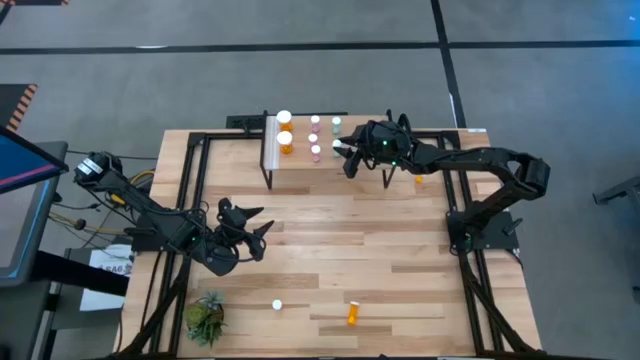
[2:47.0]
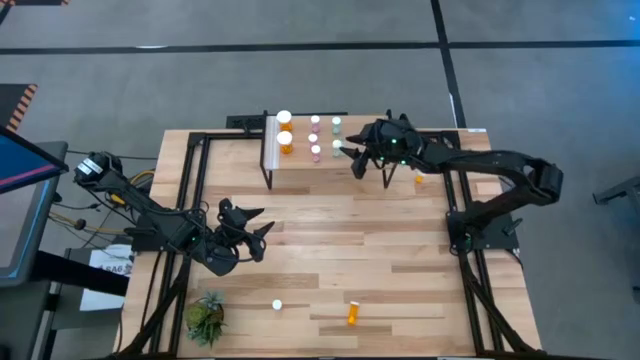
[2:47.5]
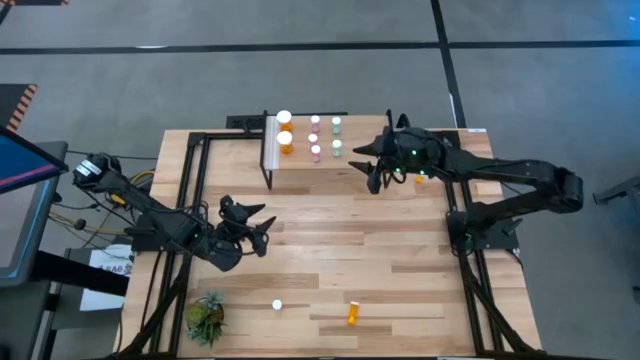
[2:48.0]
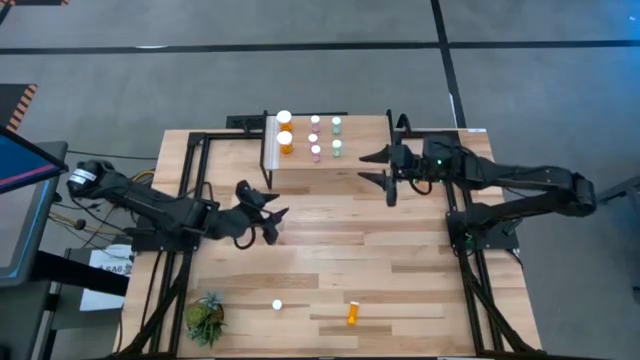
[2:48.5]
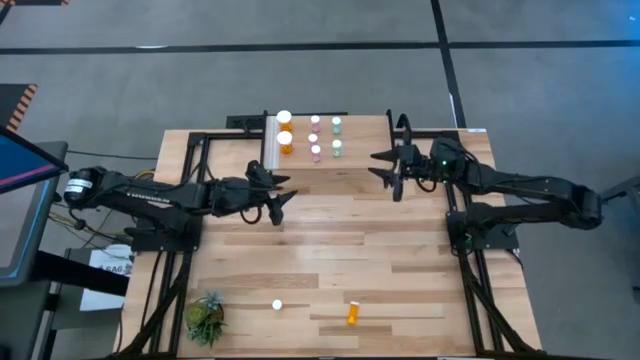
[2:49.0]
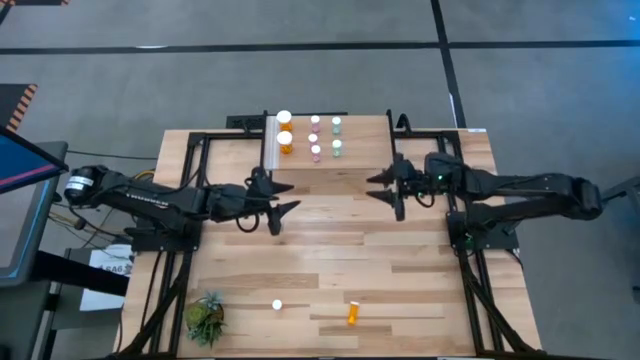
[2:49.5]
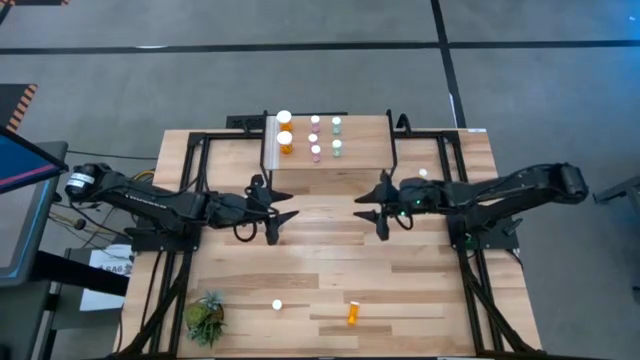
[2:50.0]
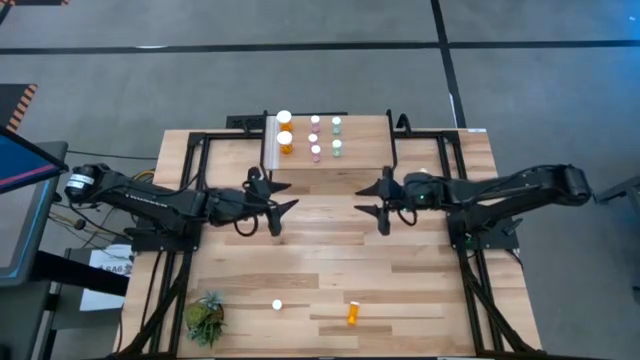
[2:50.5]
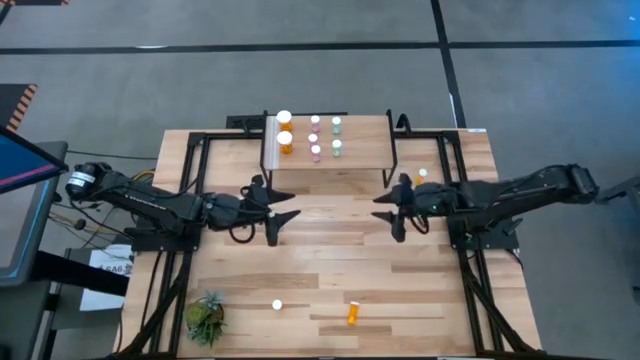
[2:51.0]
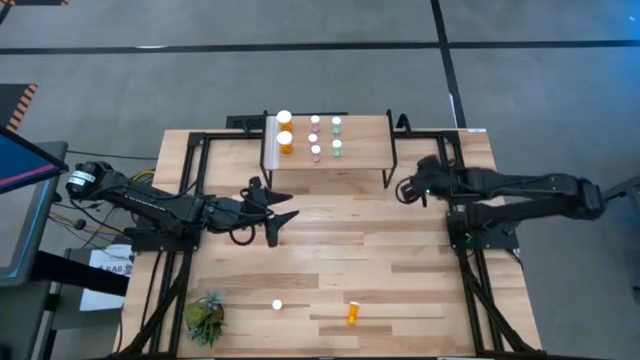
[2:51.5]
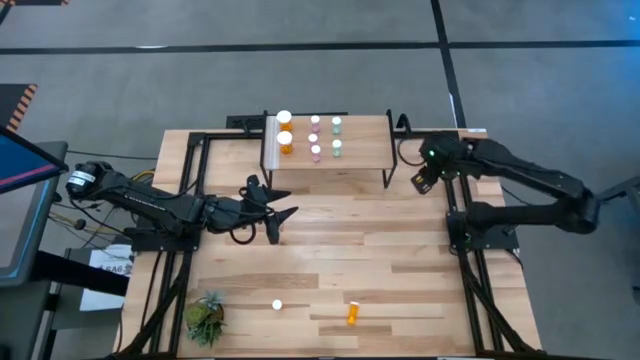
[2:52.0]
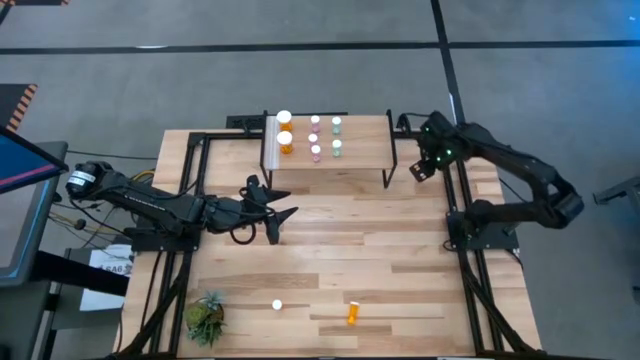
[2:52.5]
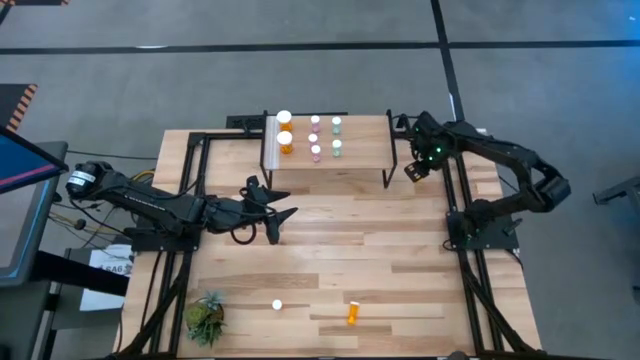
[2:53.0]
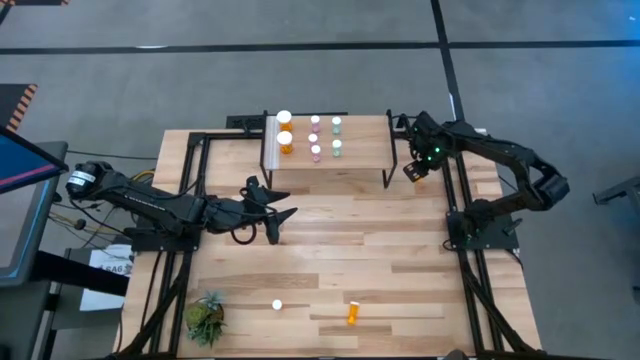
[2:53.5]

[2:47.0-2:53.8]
Task: Pick and place medicine bottles onto shelf by color
Put the top small orange pill bottle on the shelf

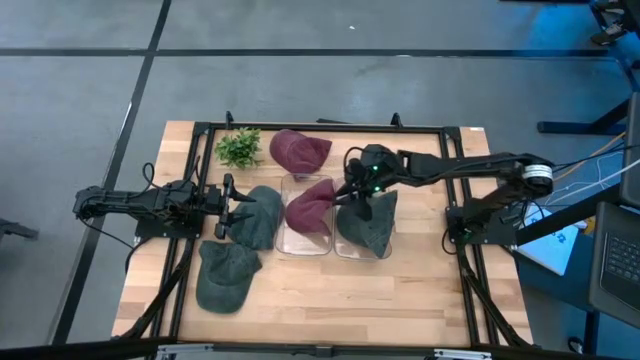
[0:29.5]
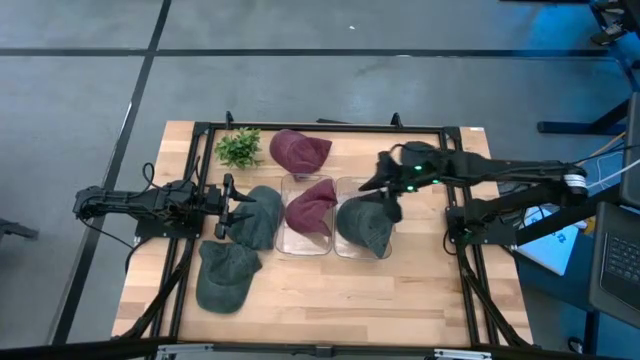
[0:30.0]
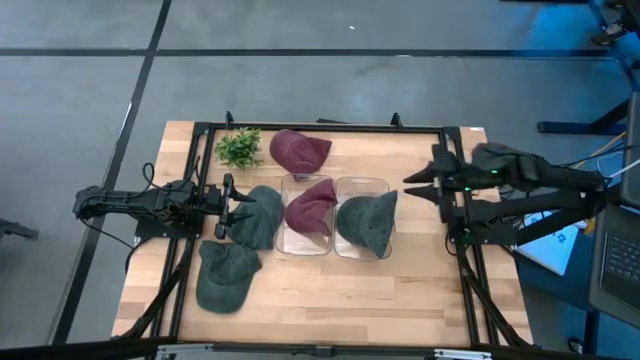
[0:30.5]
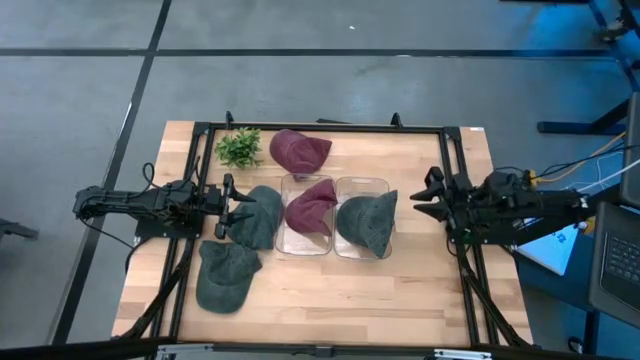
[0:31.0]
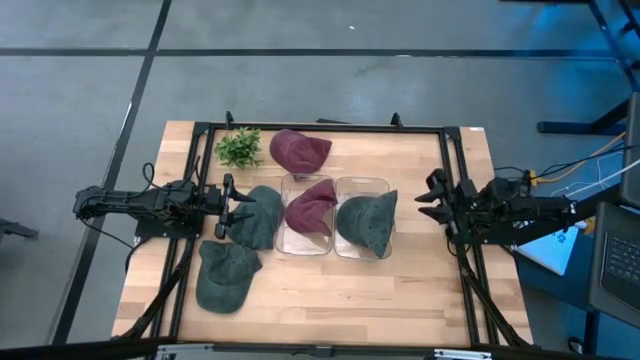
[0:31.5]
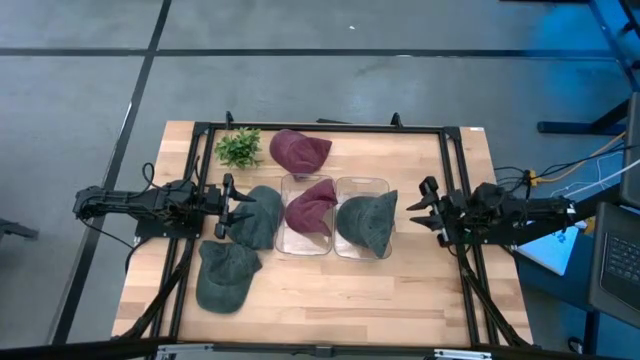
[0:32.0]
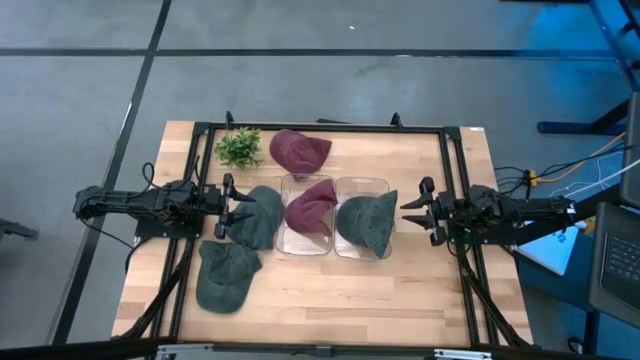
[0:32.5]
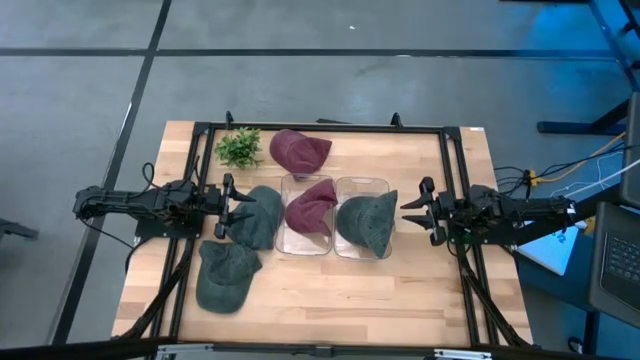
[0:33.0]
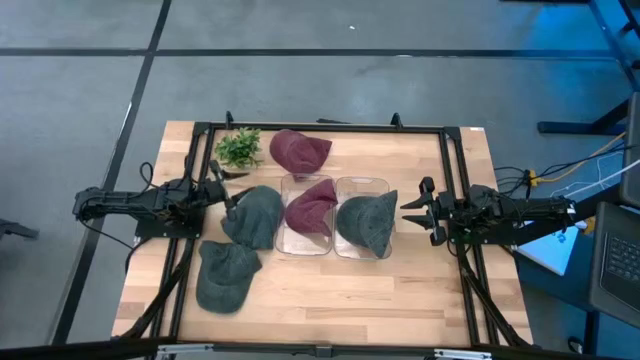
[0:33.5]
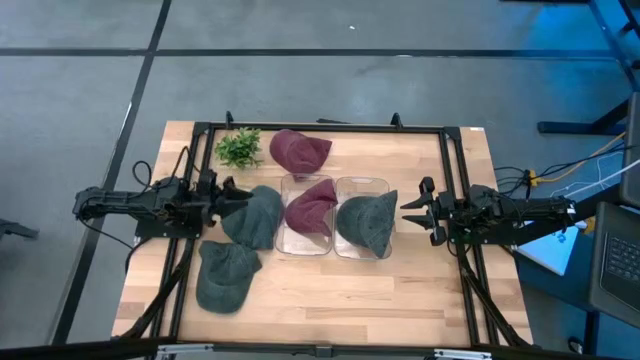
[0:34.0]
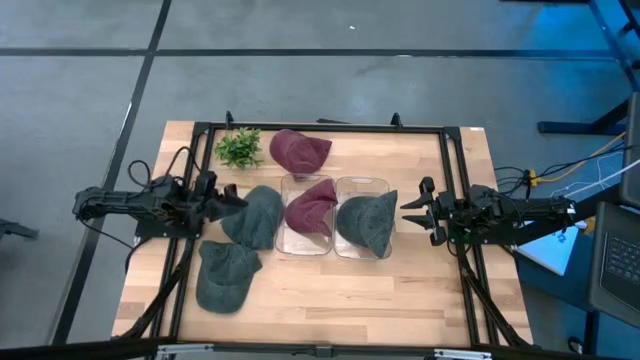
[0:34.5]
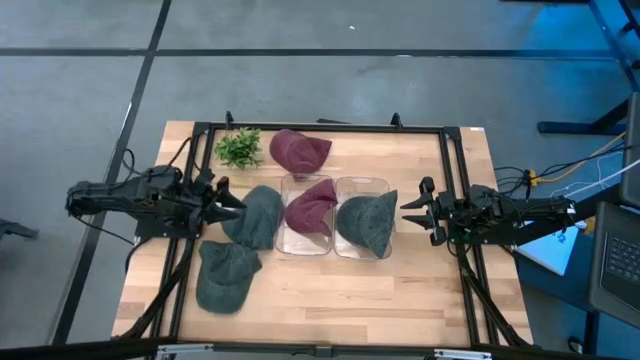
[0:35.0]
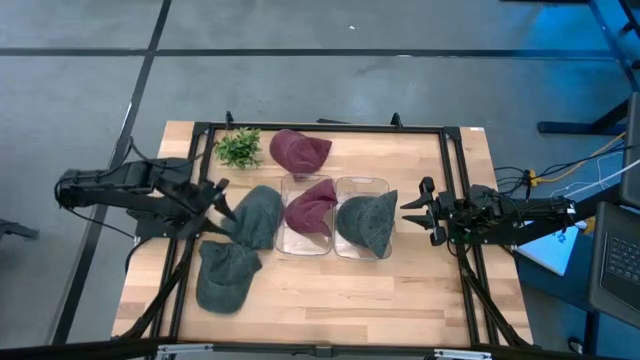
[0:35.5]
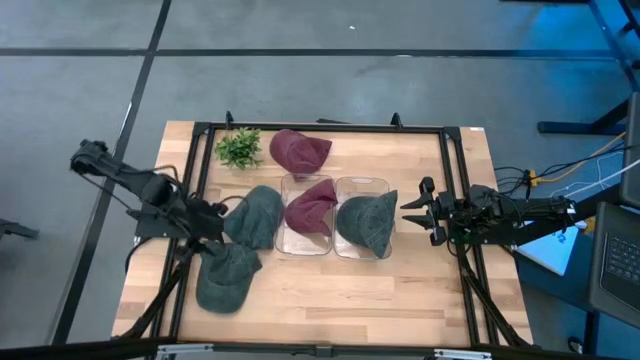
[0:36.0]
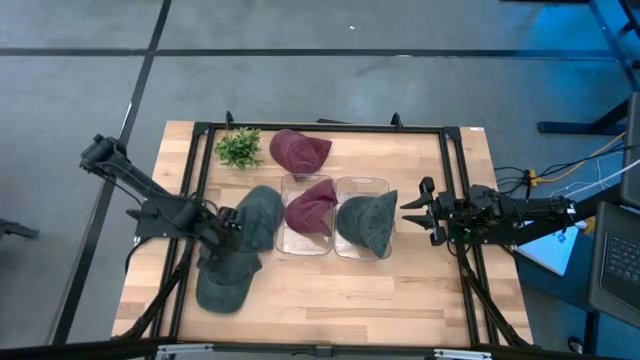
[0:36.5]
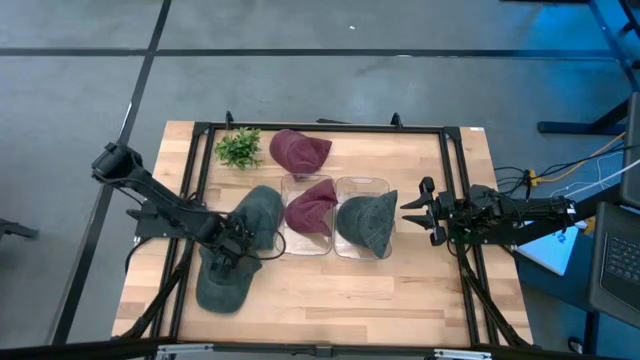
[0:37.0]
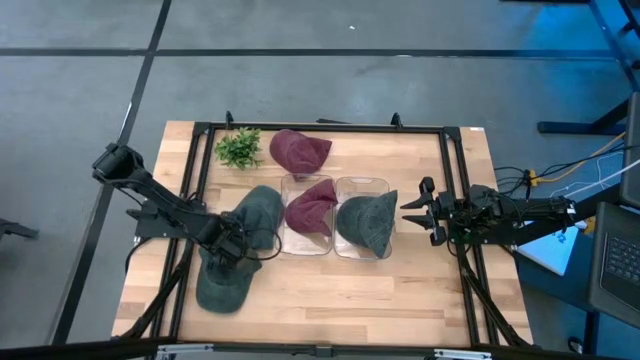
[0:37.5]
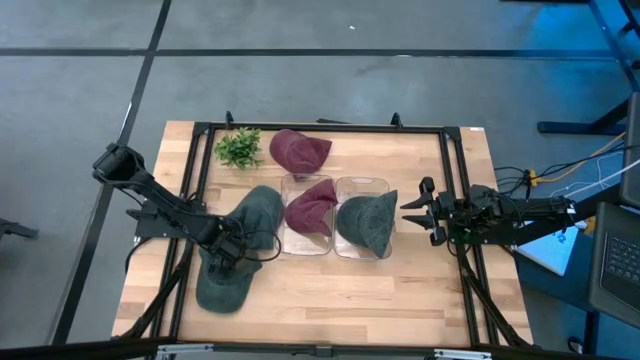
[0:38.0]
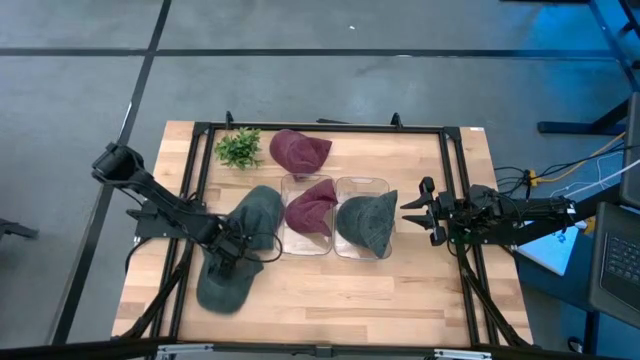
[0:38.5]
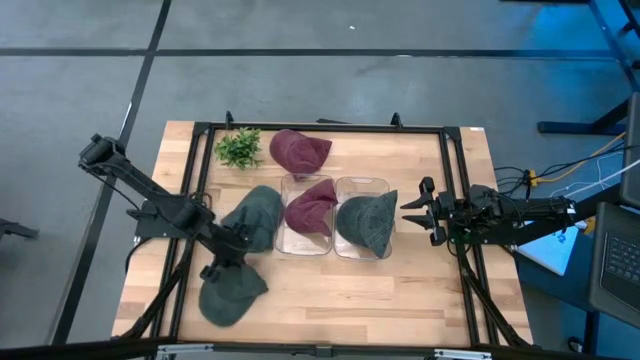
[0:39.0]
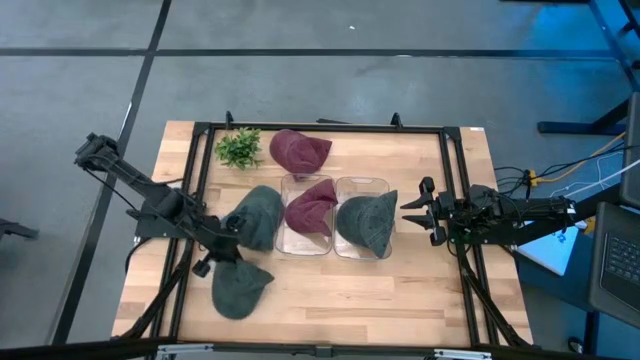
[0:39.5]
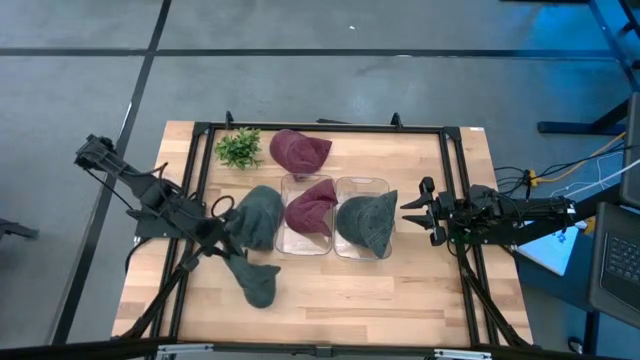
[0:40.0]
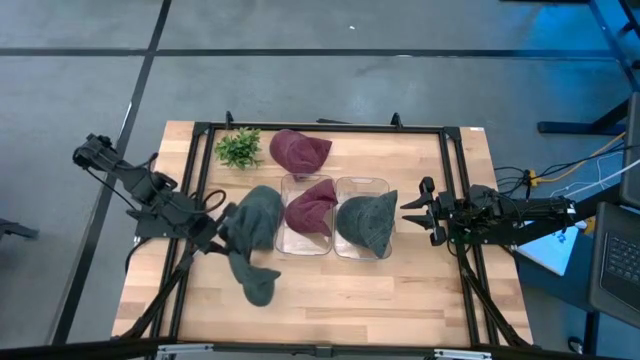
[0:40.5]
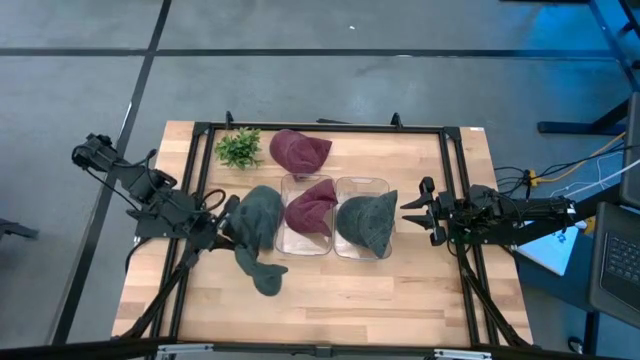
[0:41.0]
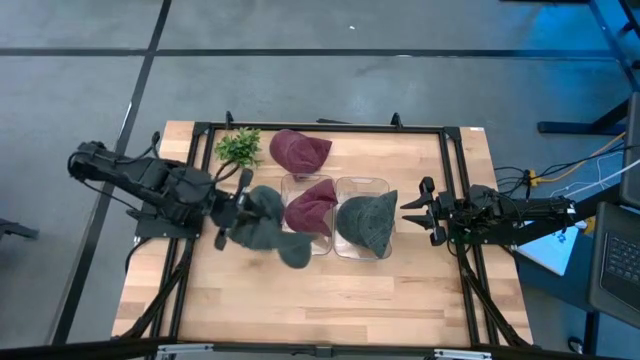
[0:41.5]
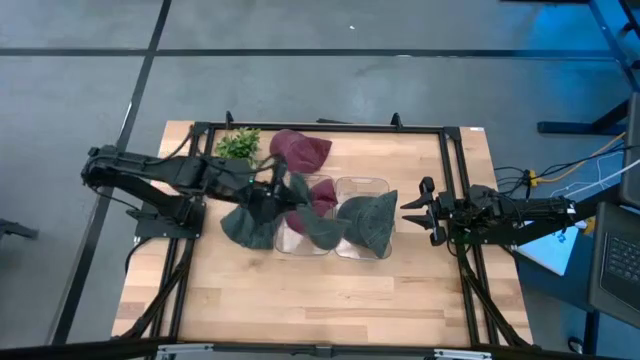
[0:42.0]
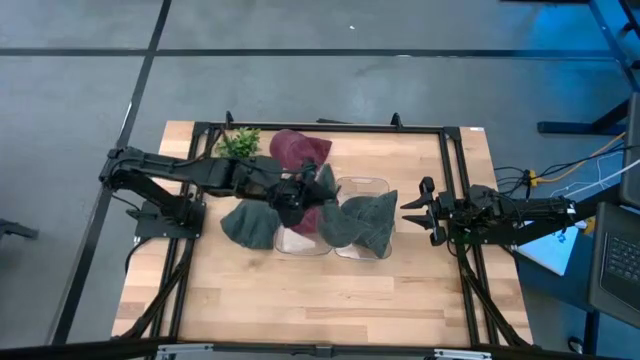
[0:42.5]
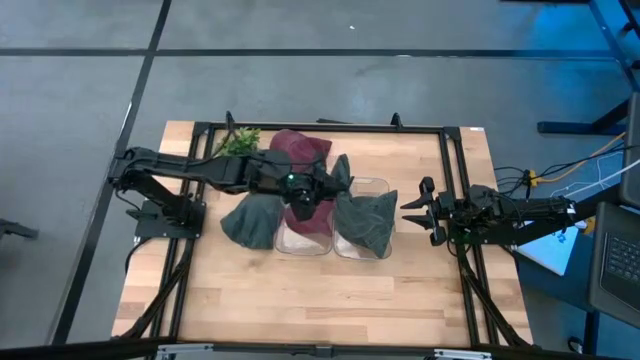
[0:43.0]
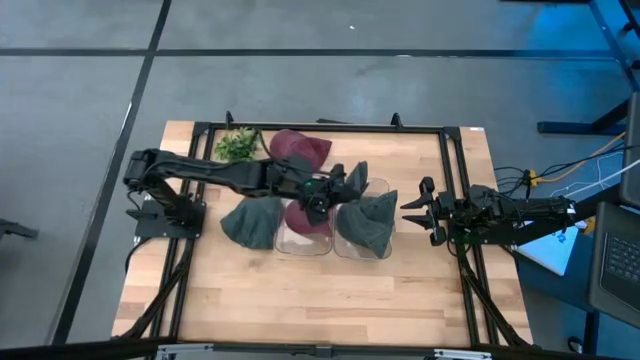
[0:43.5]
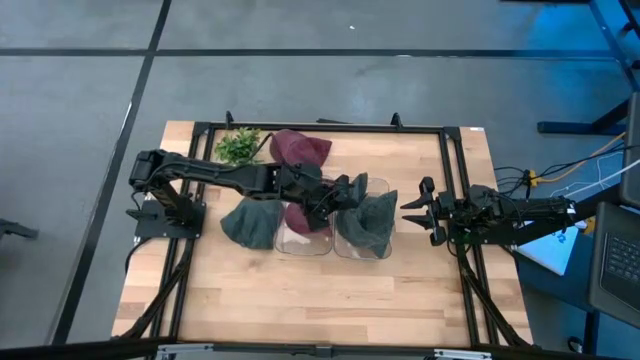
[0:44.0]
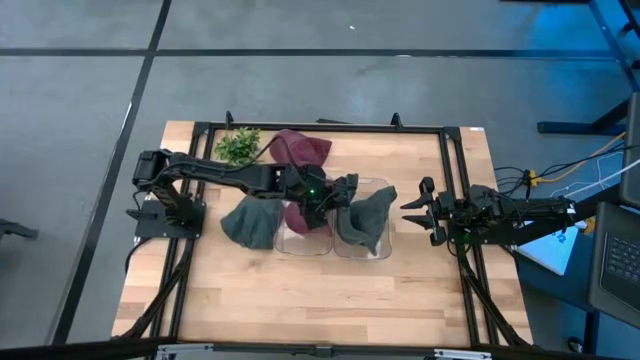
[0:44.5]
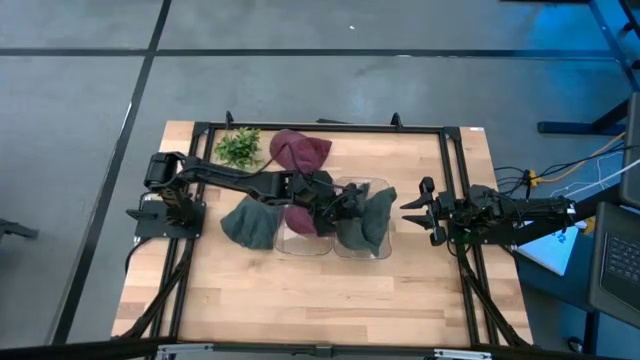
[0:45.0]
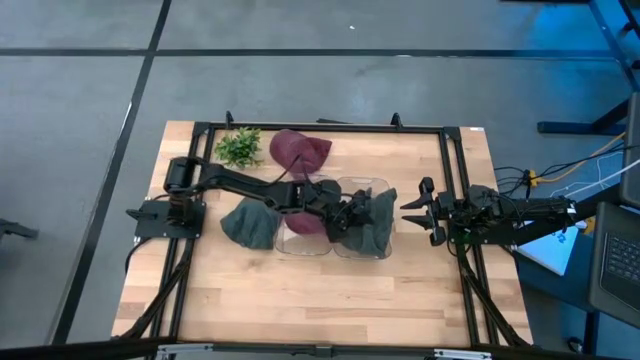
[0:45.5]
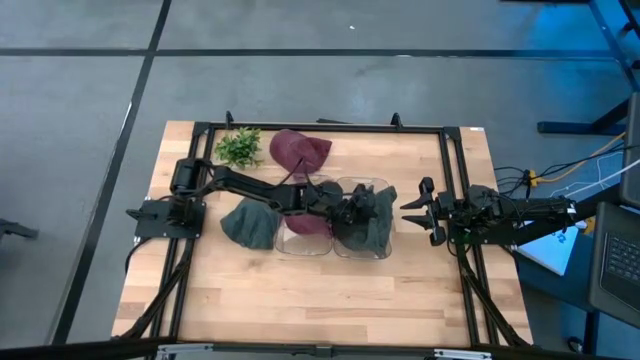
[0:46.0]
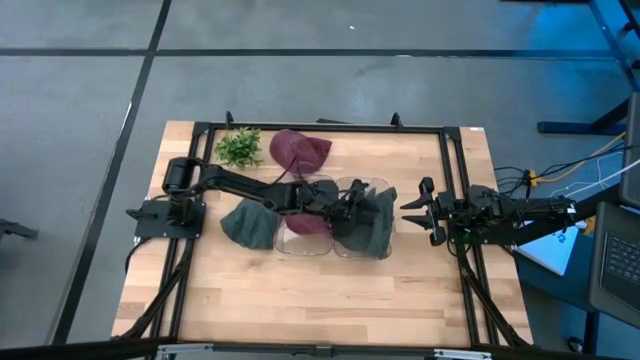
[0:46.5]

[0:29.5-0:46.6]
Task: Pick & Place hat
Put the bottom blue cap into the right transparent bin
